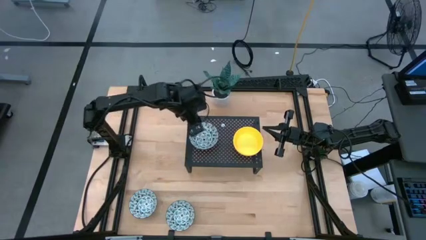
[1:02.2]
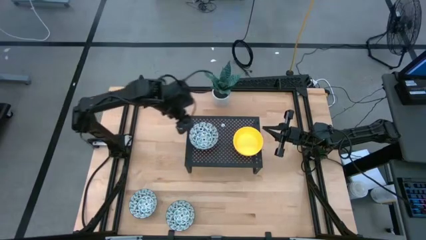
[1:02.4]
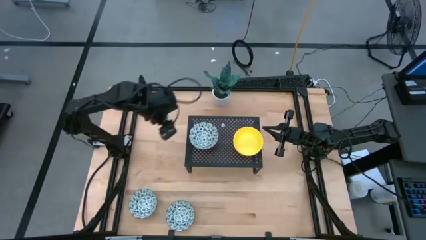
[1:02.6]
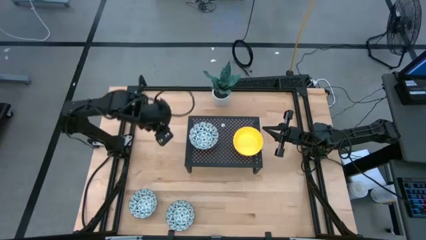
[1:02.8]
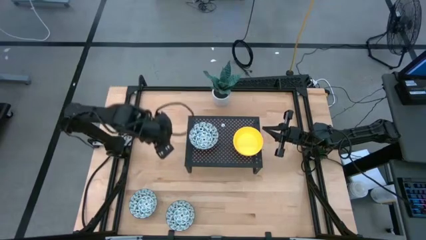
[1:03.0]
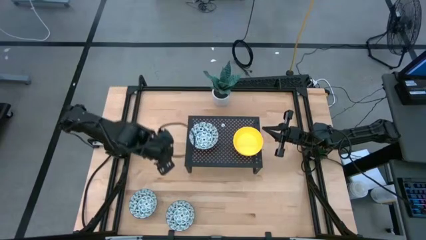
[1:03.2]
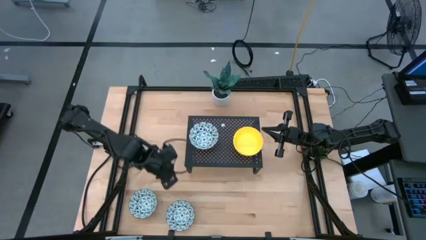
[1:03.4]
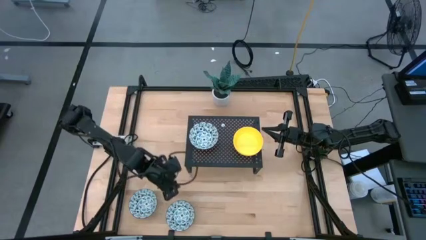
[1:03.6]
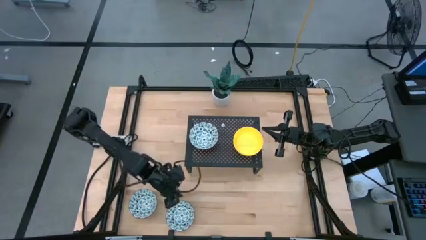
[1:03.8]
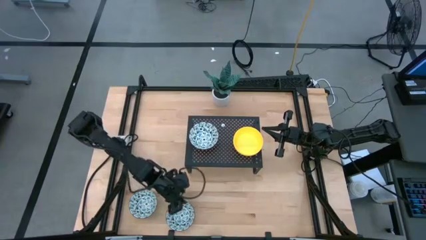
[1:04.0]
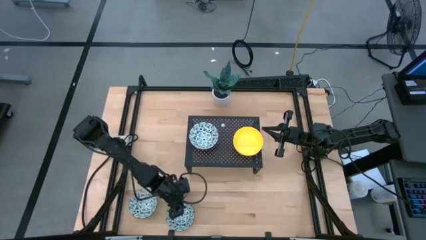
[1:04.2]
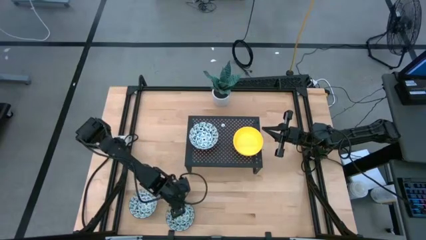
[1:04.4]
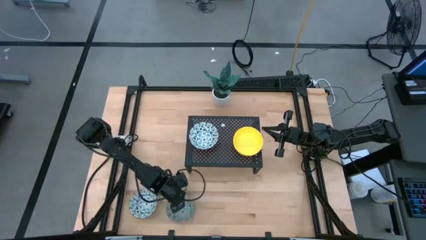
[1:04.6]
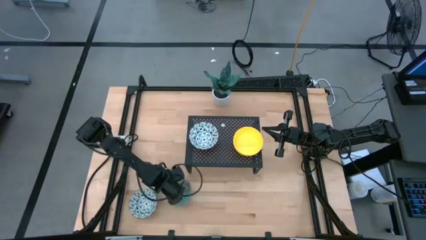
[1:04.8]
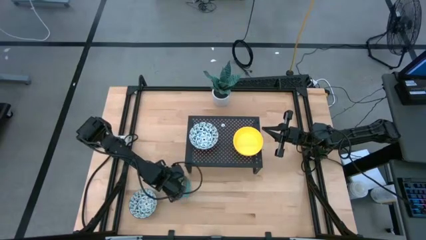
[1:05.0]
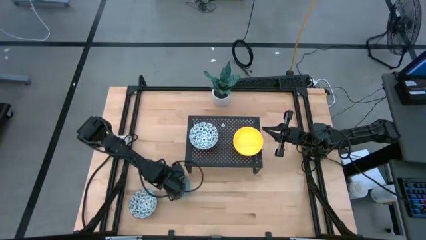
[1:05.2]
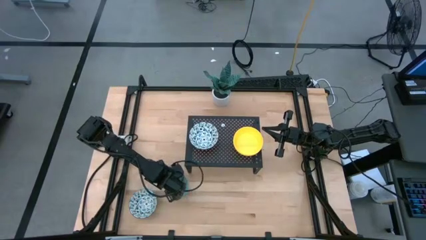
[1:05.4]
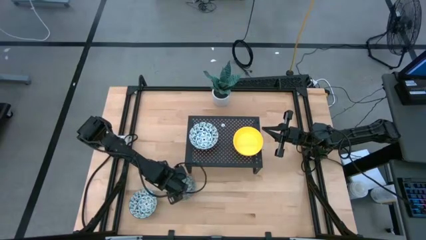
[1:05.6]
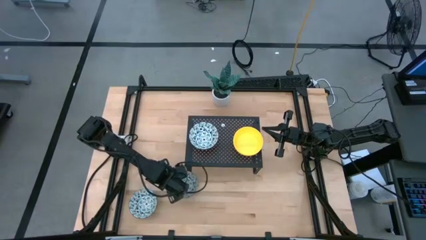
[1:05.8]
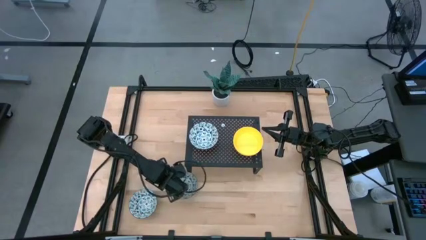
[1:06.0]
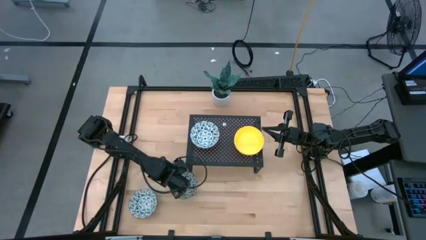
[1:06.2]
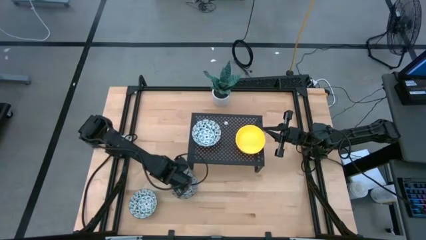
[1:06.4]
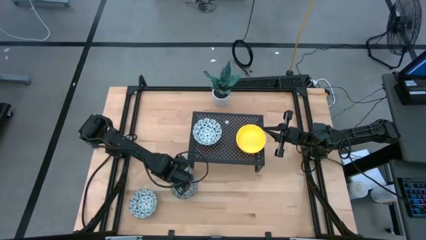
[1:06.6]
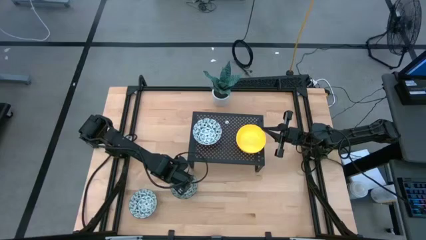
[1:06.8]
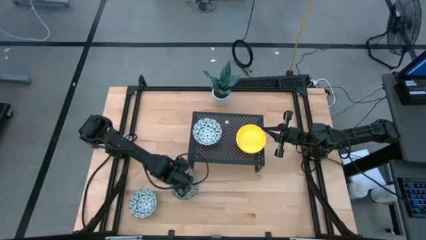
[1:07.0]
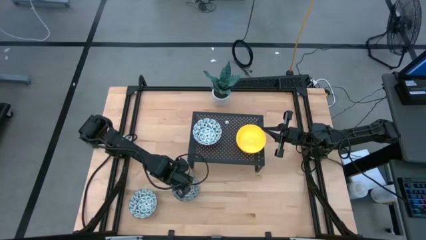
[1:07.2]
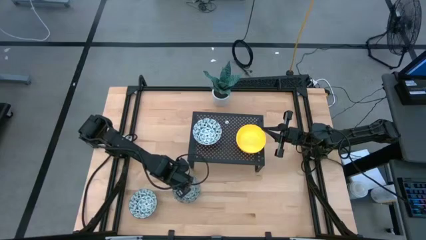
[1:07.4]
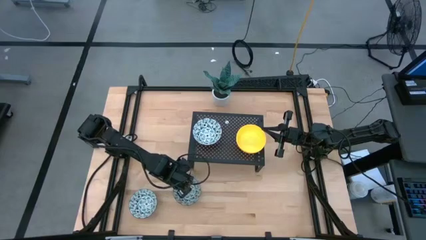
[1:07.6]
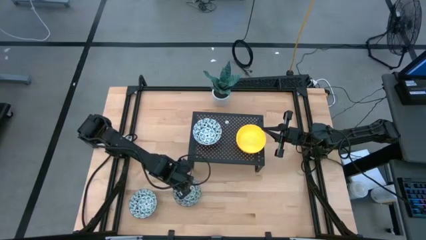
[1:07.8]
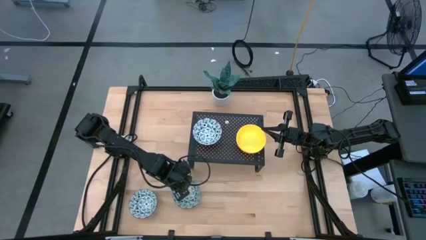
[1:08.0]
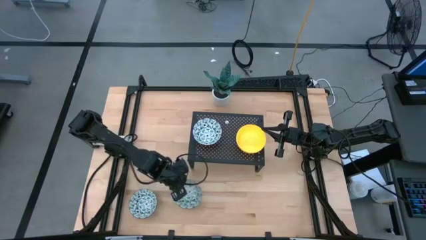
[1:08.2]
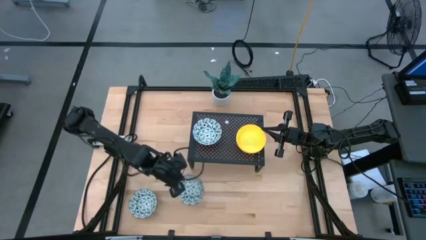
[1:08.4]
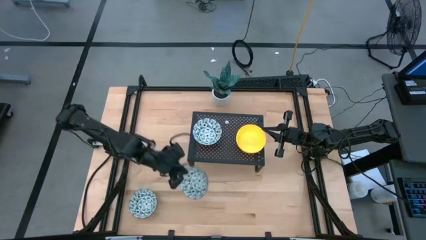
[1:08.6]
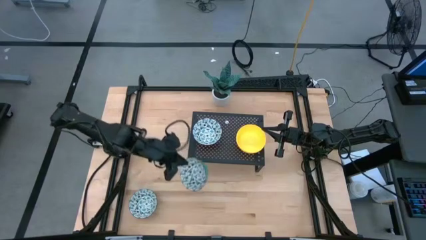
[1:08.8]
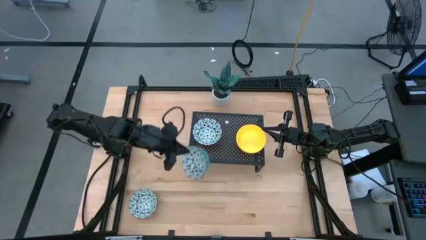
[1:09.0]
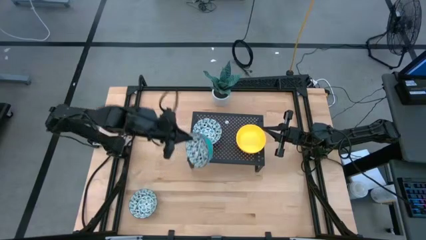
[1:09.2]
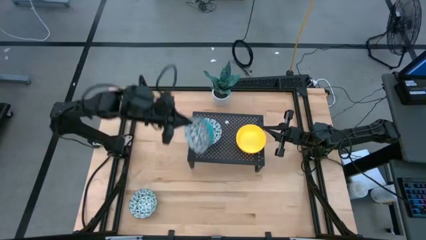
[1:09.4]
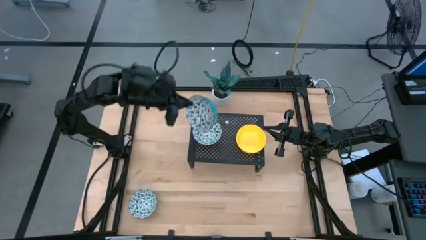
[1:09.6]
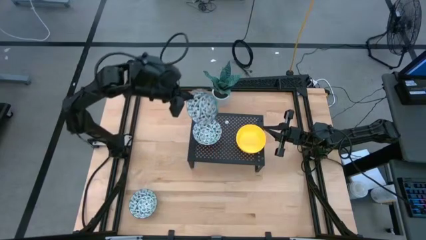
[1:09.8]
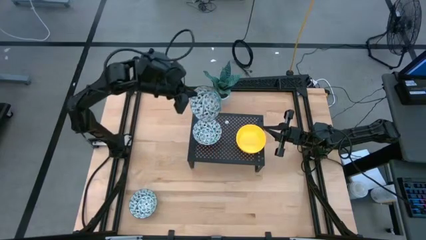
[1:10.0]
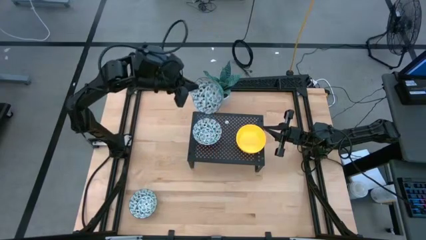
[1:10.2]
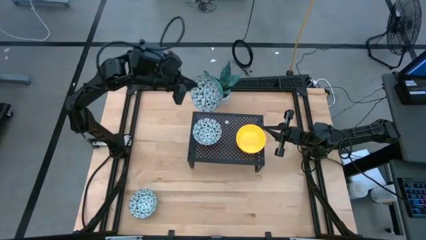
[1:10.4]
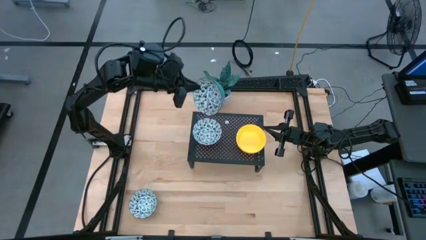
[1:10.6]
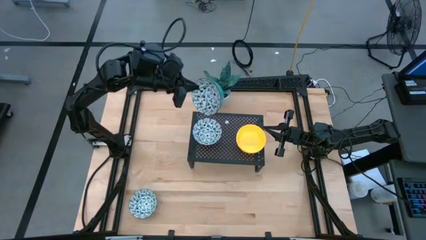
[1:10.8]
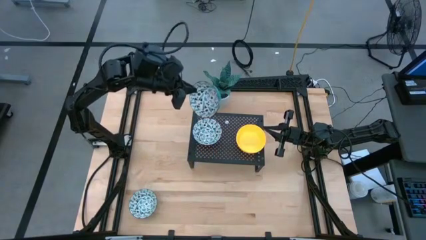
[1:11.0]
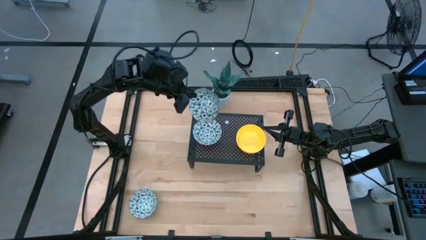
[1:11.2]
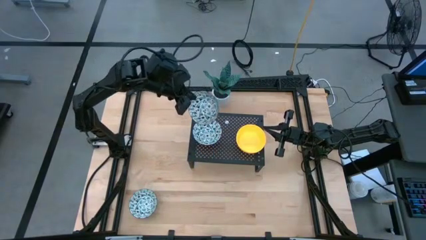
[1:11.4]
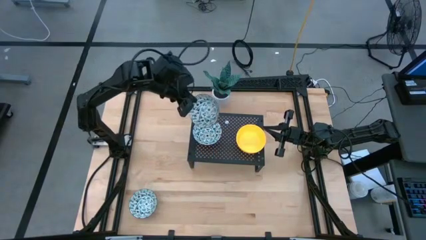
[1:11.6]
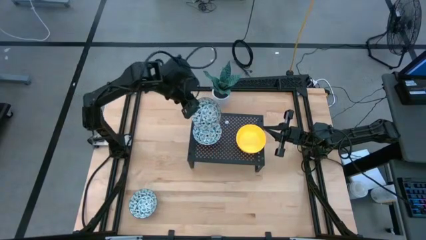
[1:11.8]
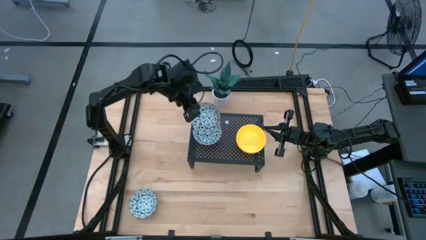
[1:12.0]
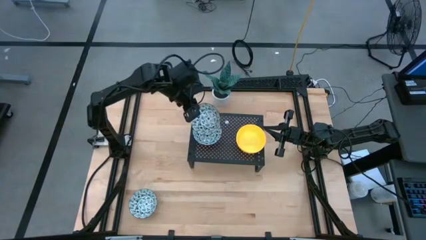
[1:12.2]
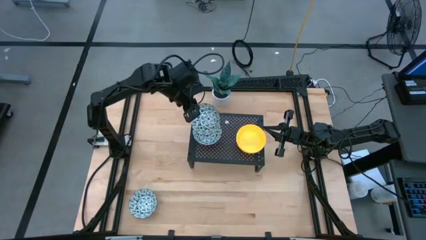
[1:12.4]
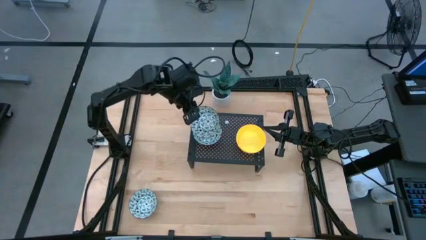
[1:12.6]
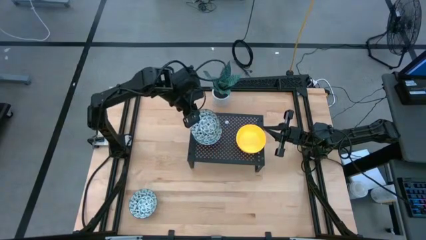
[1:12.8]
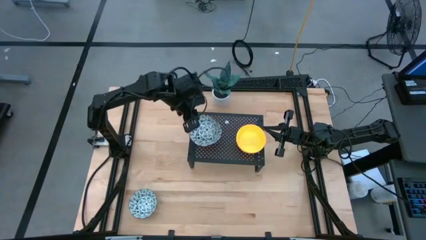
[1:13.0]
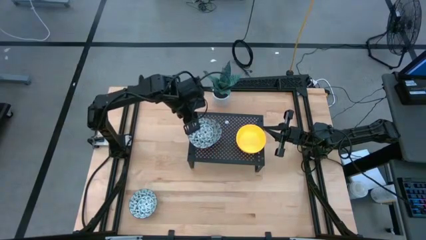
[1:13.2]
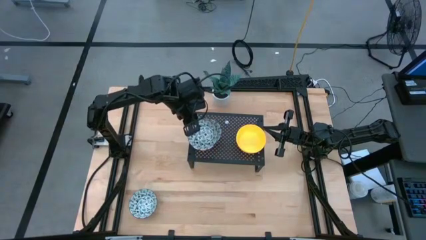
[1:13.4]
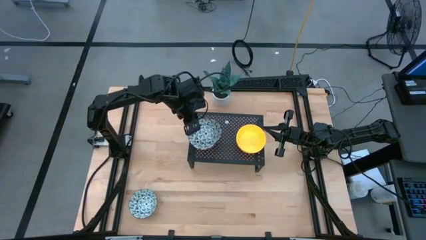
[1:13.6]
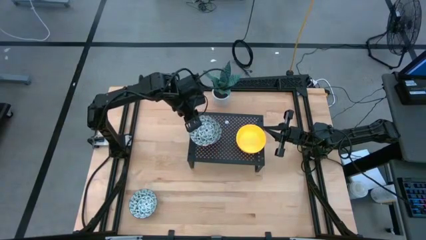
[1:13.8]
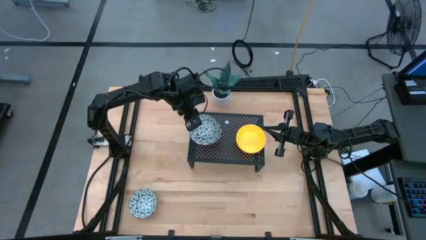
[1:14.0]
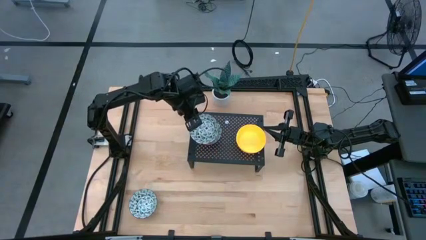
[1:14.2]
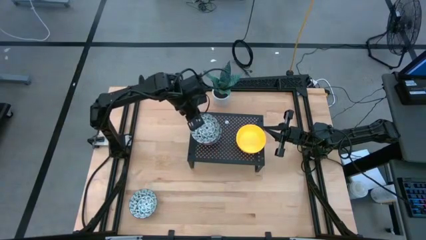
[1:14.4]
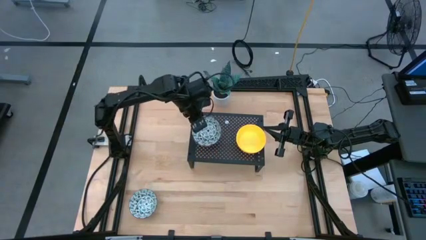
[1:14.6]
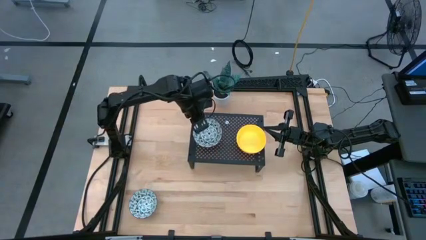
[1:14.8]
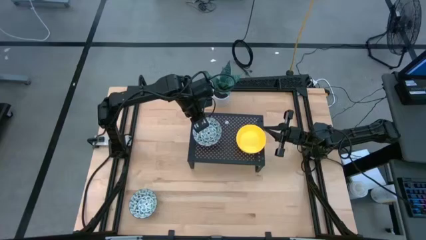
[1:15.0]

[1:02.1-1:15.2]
Task: Pick & Place Mini bowls
Stack the right blue patterned bowl on the blue patterned bowl on the shelf

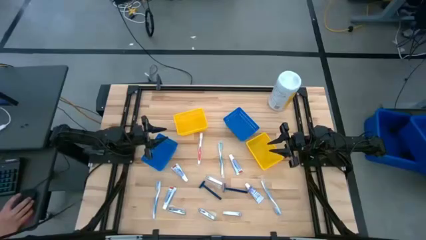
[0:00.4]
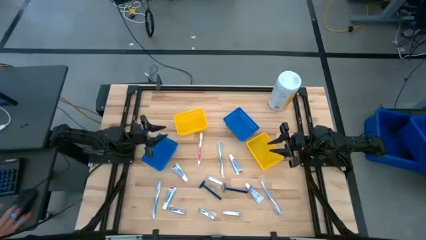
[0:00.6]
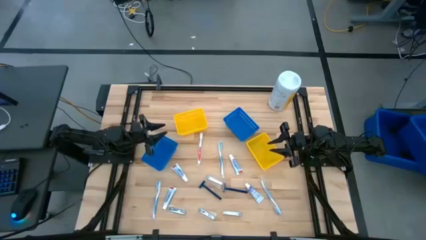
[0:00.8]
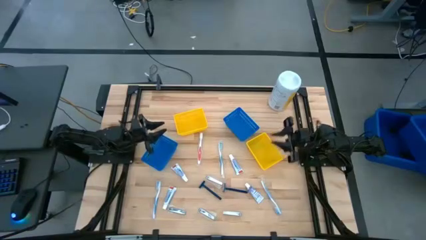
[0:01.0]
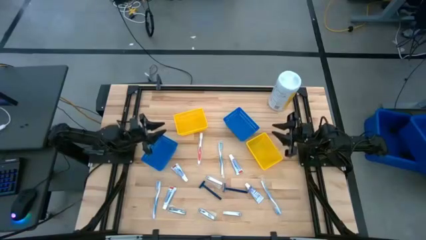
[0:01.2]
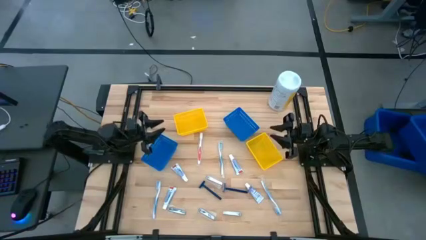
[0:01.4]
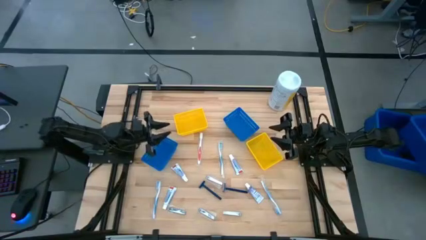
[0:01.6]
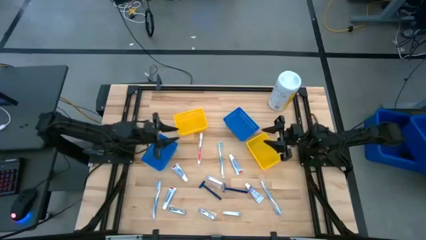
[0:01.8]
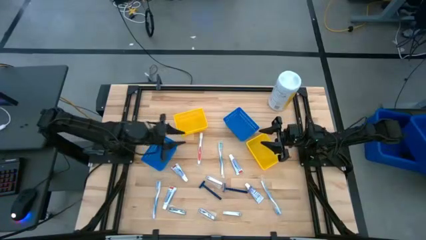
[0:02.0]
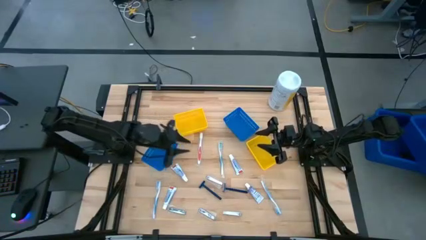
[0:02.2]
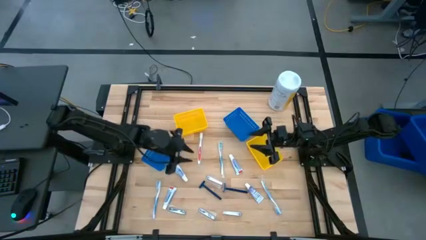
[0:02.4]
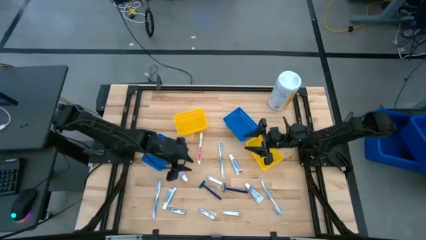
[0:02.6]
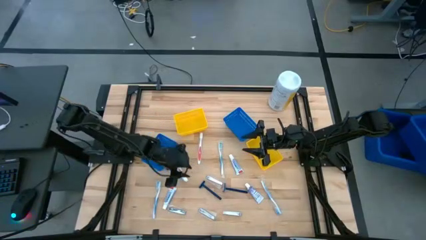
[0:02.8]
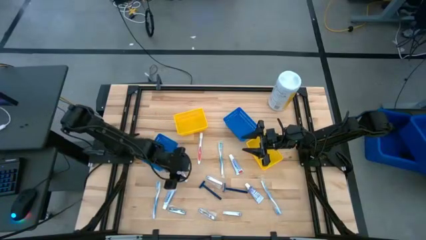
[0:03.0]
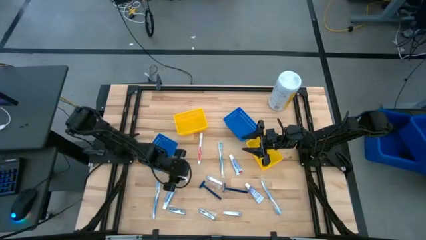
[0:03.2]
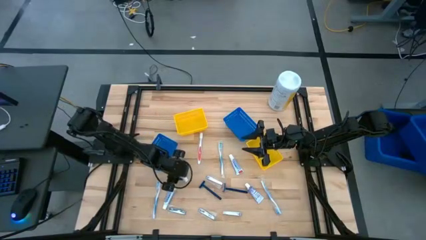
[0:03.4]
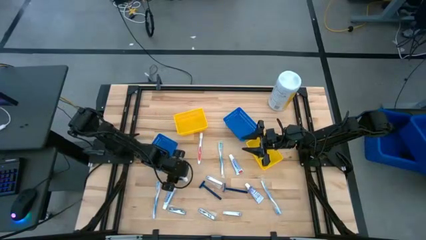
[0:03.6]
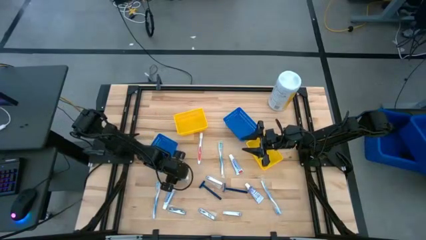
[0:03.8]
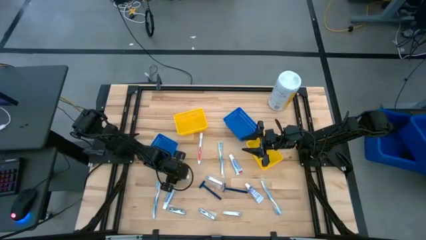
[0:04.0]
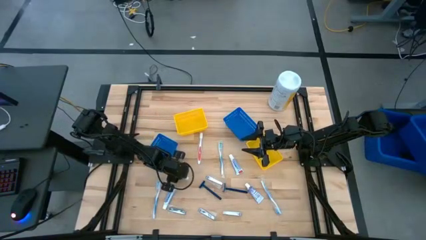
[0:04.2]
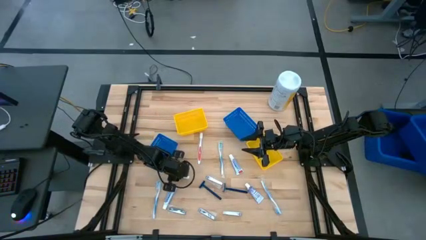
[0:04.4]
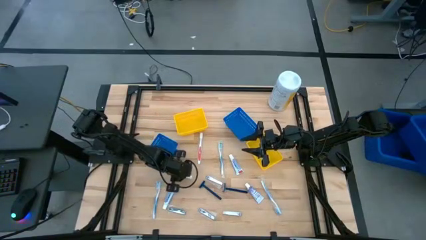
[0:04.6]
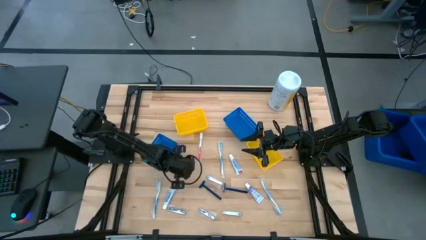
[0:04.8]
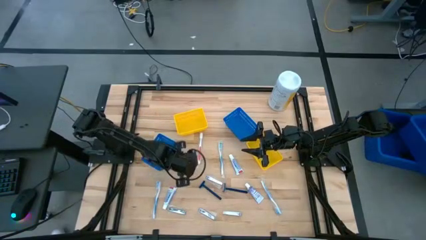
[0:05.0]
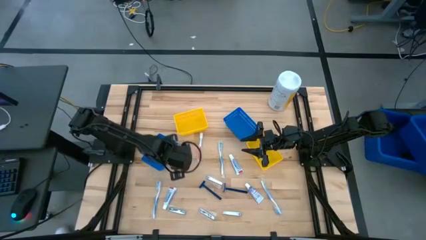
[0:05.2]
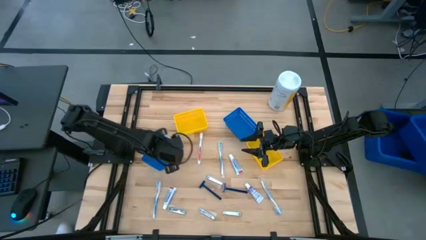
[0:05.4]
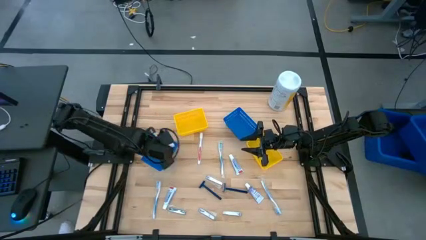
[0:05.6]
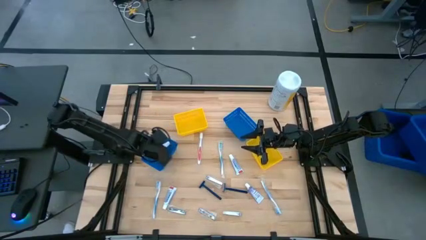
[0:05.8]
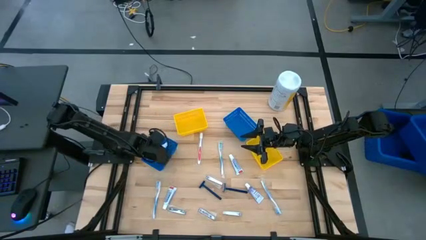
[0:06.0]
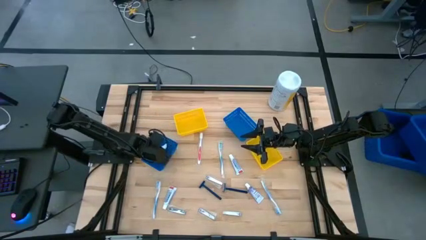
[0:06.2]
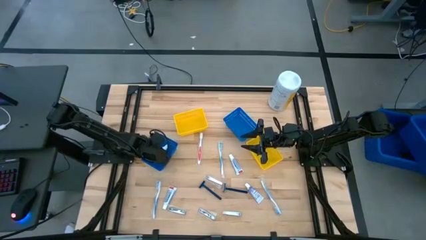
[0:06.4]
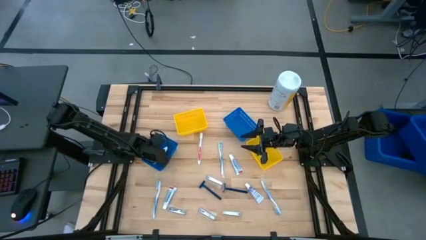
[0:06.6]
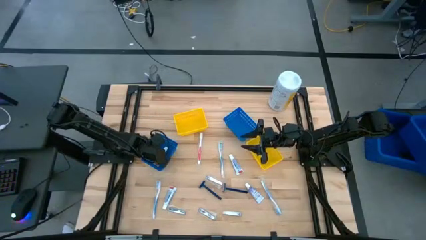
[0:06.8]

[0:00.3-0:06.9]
Task: Pick & Place Travel size toiletries
Put the toothpaste into the left blue bin
